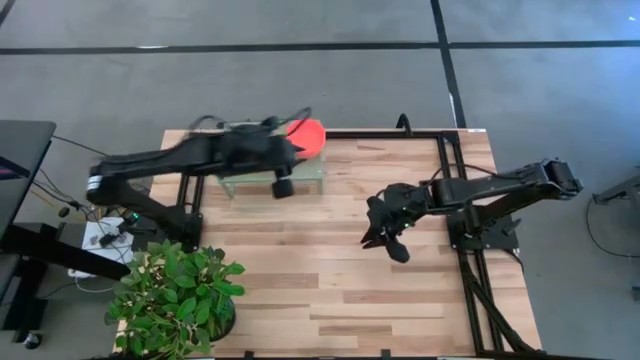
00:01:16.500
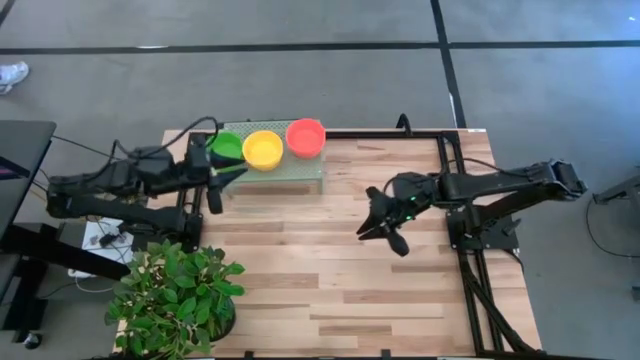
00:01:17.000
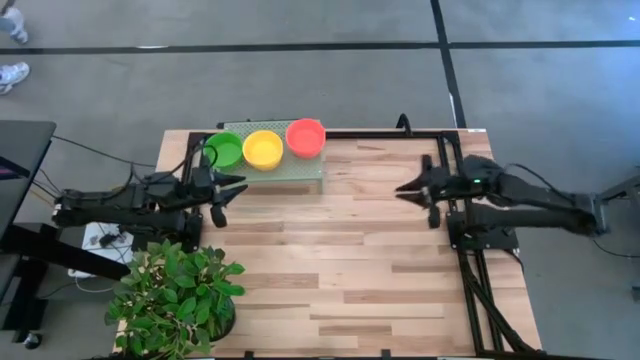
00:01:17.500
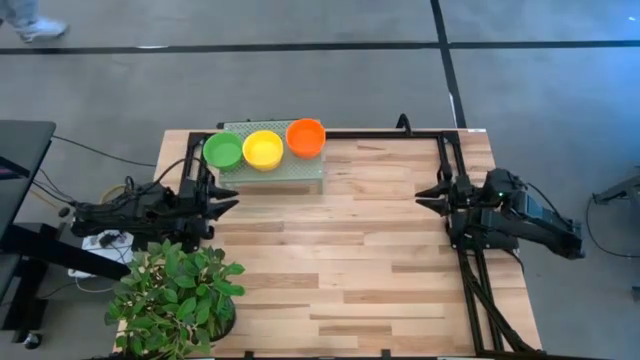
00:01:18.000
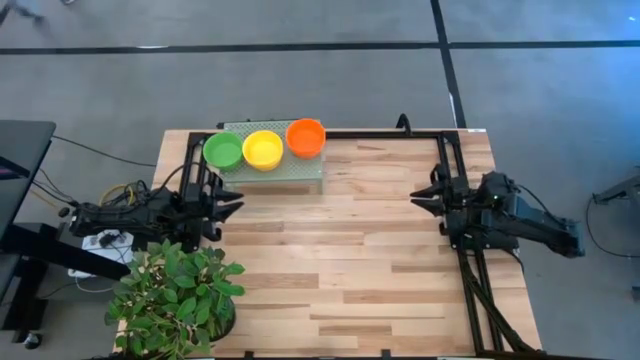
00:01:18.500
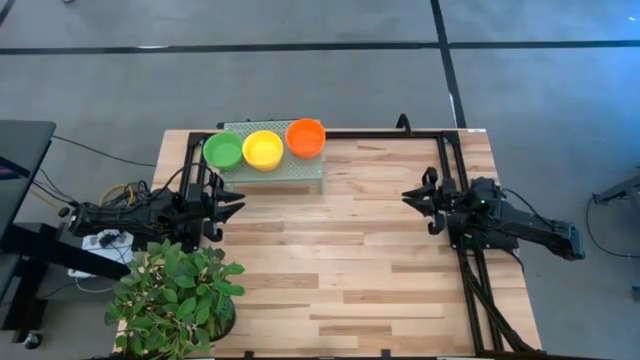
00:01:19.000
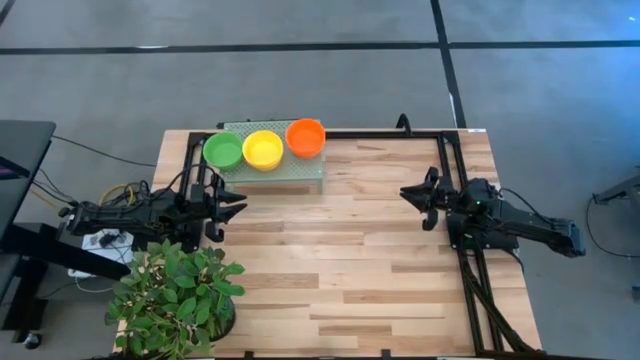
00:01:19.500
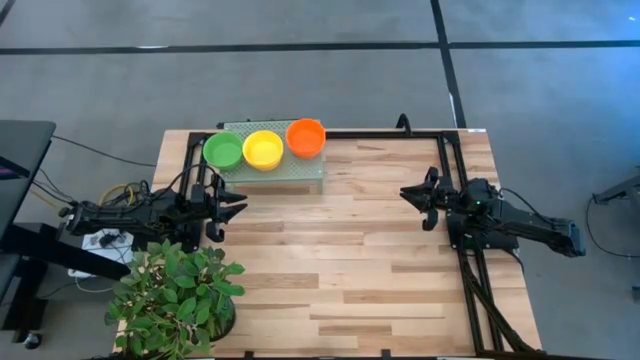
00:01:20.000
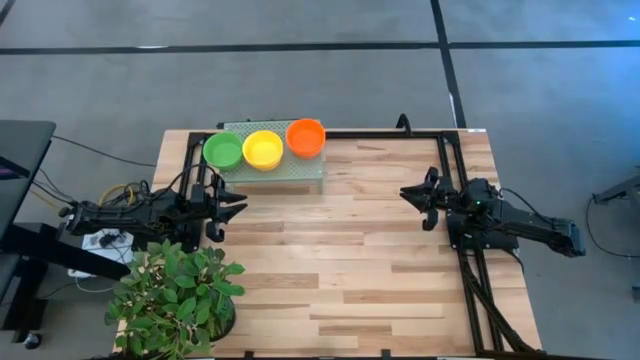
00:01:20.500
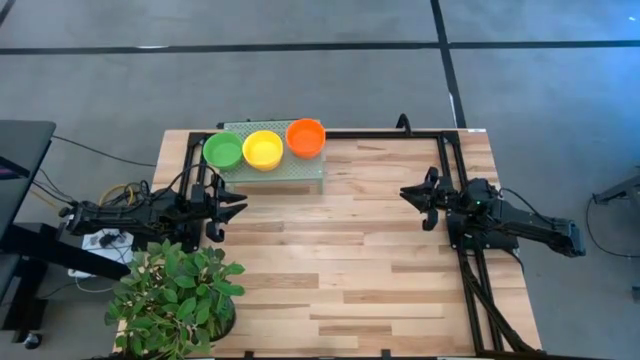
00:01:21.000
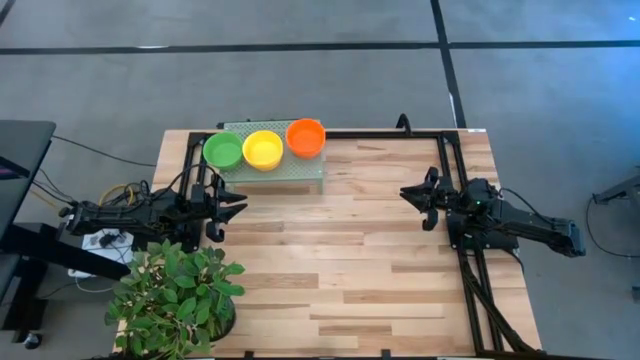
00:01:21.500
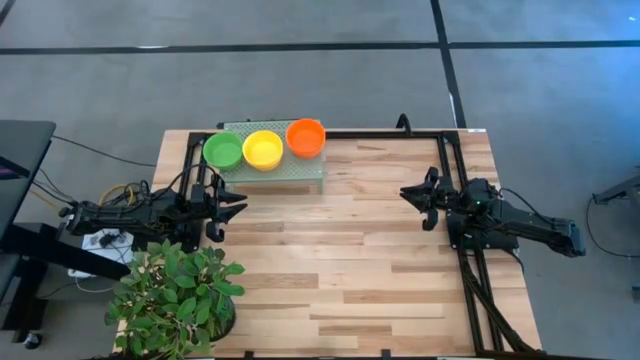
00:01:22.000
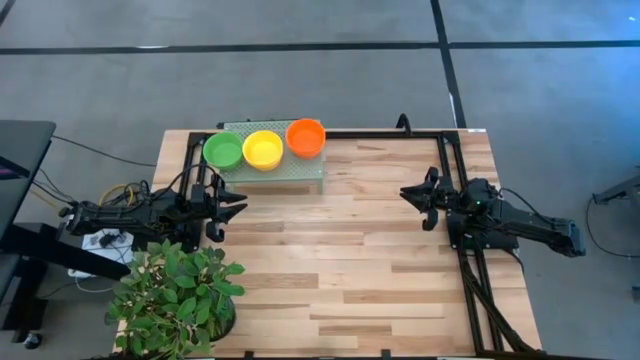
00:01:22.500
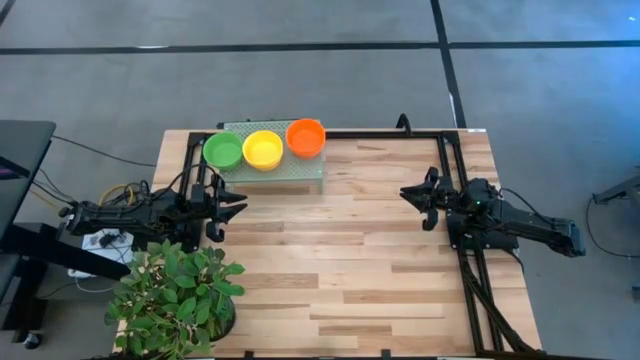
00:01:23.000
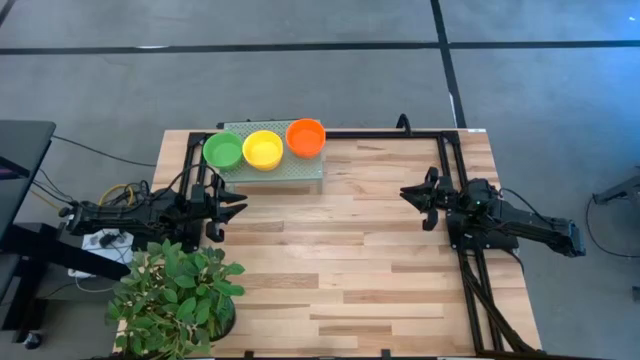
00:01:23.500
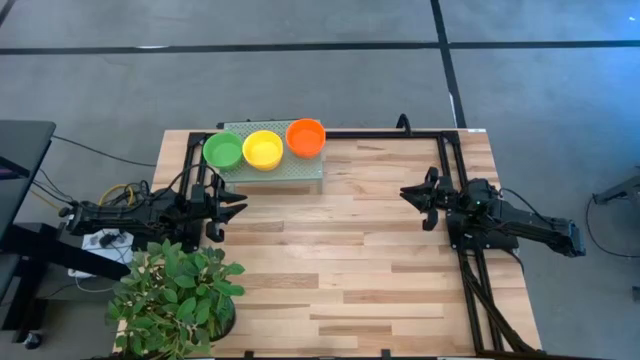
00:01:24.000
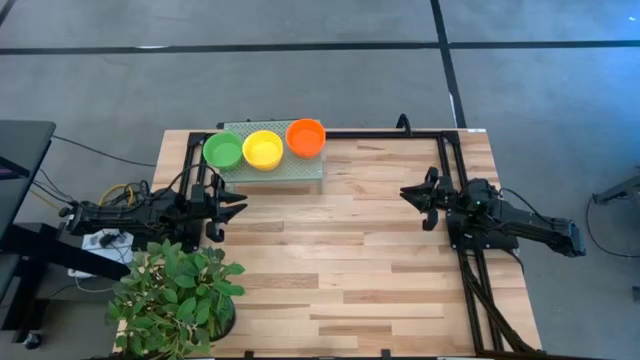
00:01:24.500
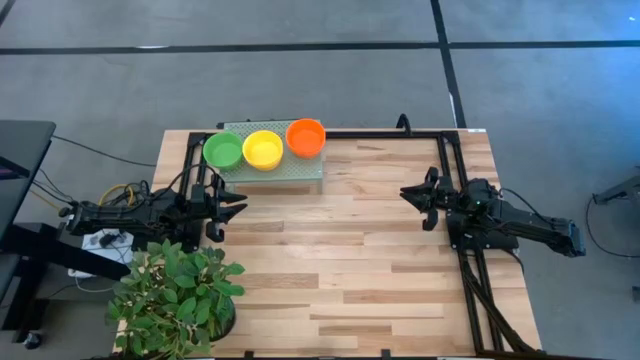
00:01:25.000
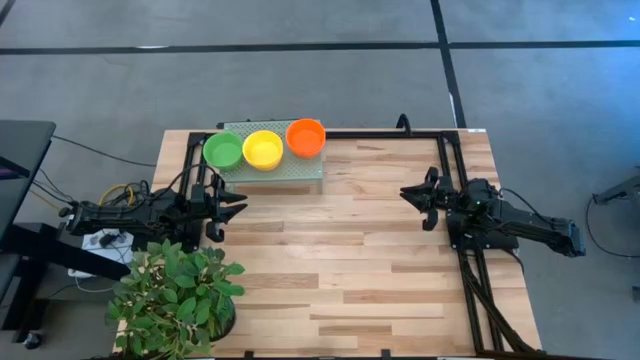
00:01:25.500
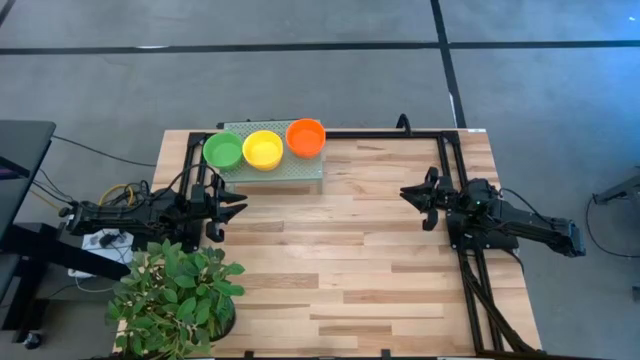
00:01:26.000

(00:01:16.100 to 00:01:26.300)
Task: Pick & Place Mini bowls
Return to Home Position

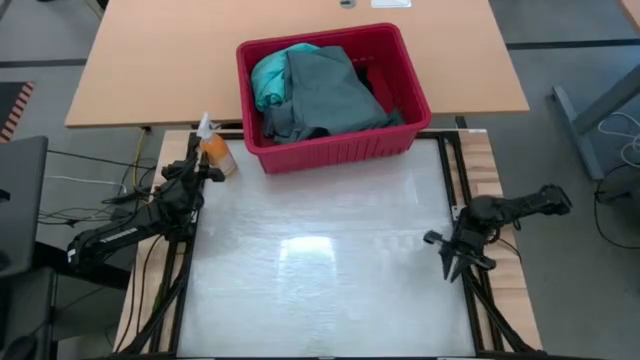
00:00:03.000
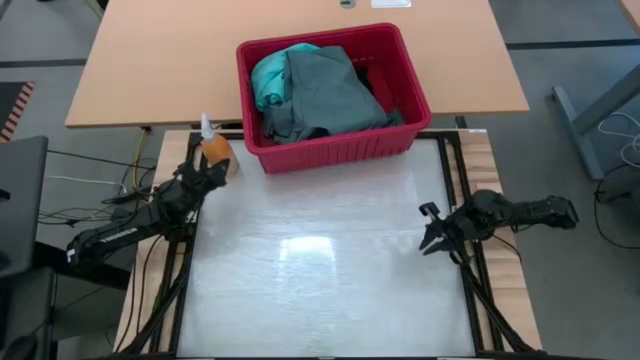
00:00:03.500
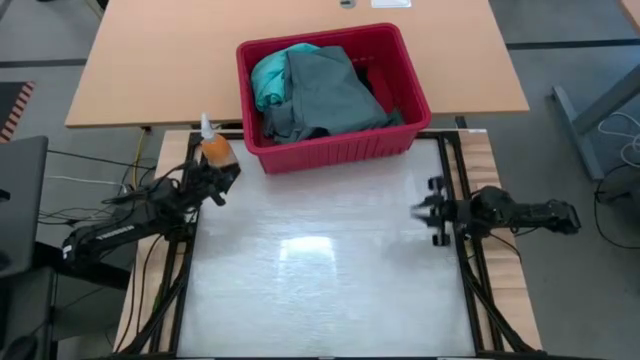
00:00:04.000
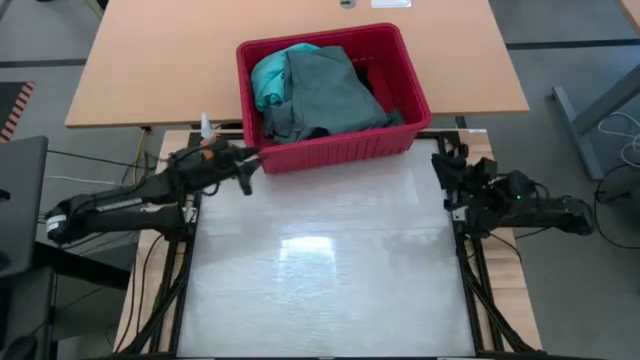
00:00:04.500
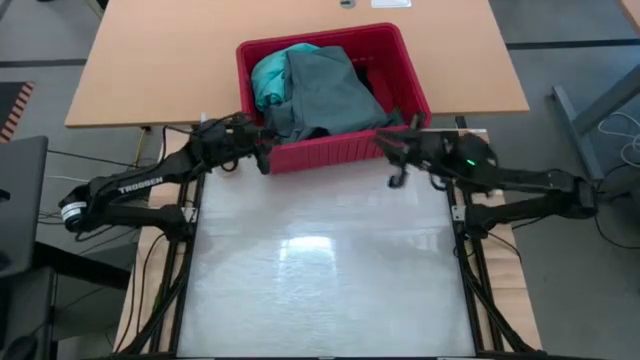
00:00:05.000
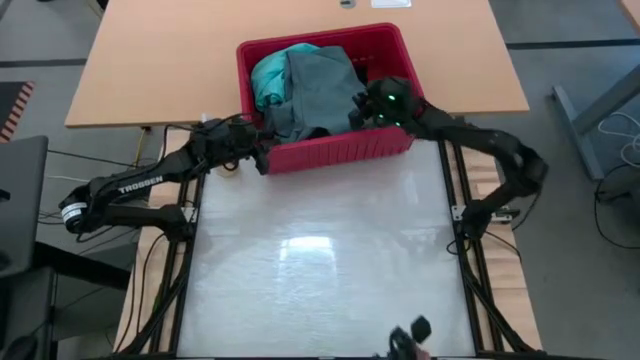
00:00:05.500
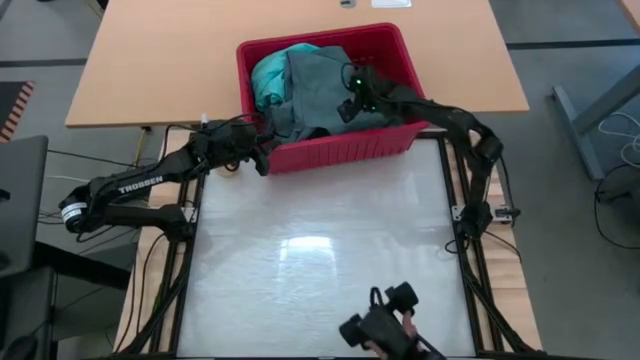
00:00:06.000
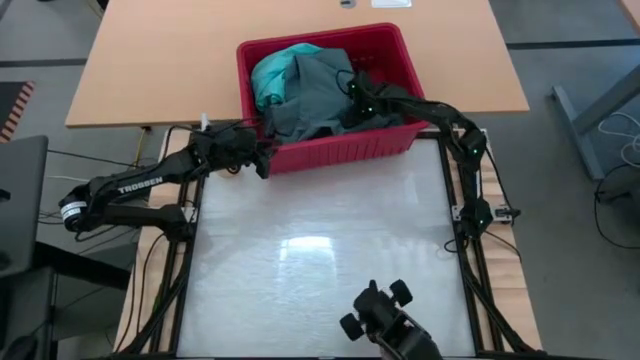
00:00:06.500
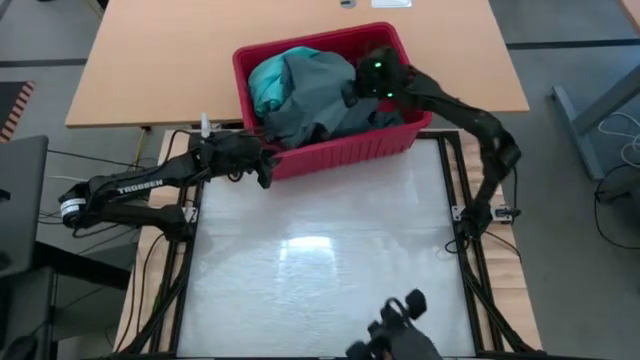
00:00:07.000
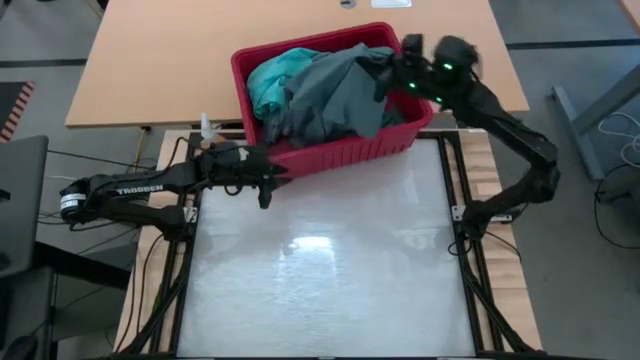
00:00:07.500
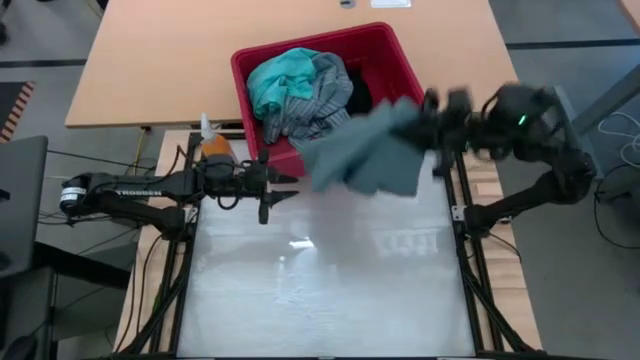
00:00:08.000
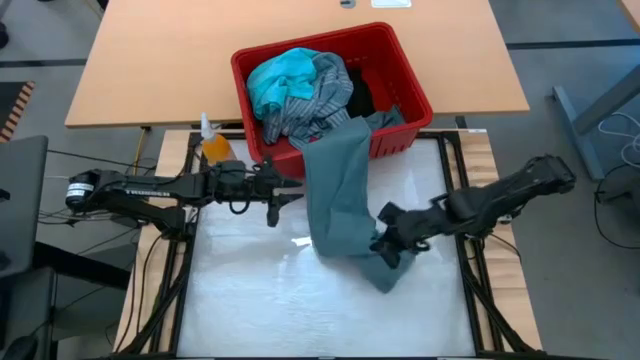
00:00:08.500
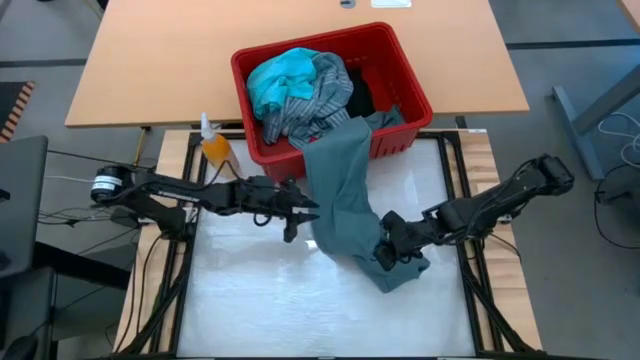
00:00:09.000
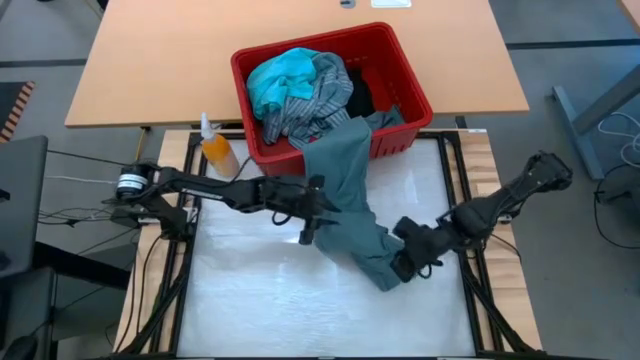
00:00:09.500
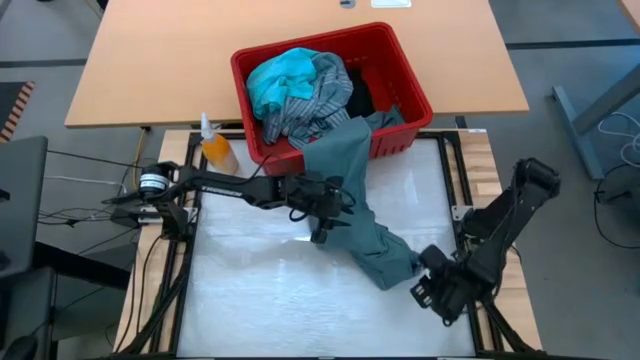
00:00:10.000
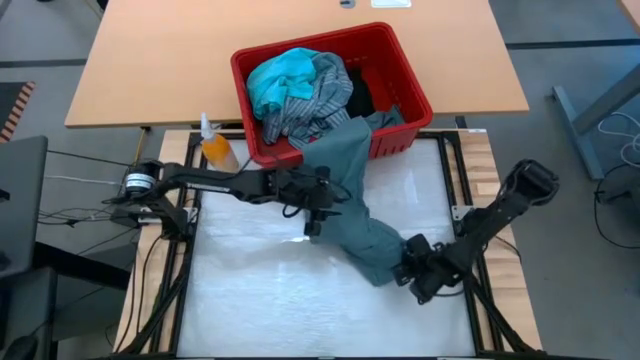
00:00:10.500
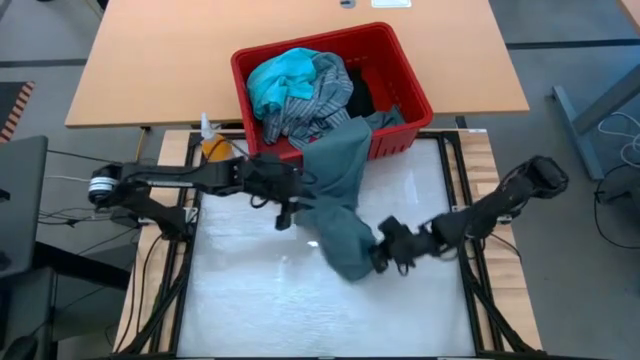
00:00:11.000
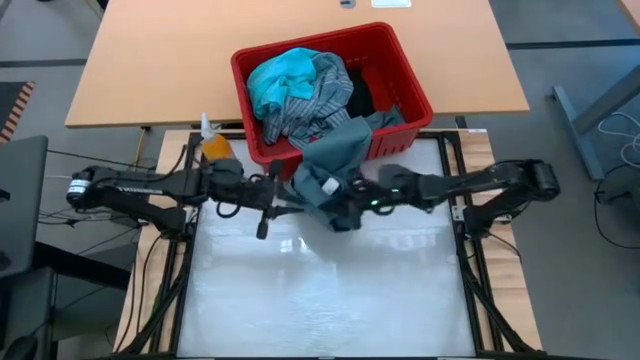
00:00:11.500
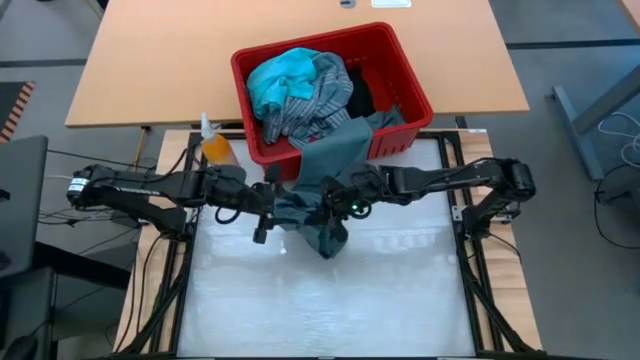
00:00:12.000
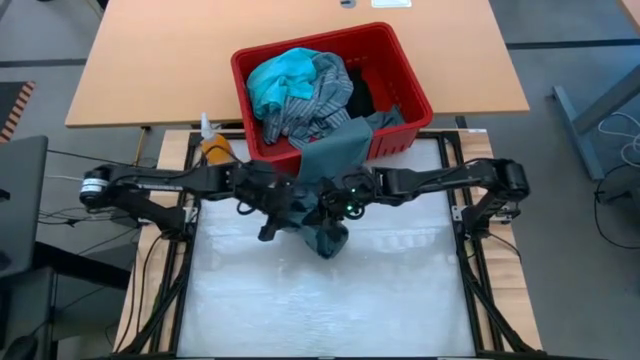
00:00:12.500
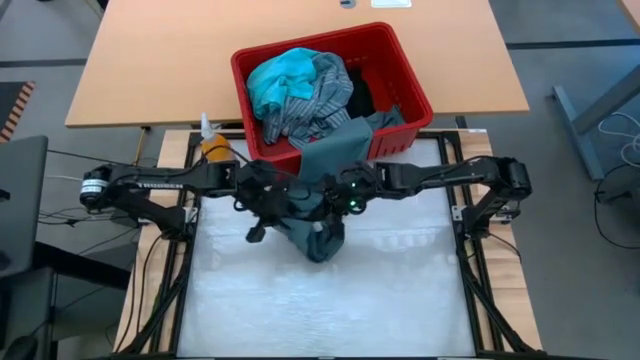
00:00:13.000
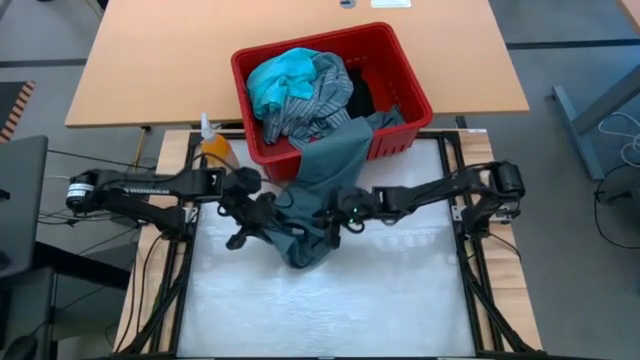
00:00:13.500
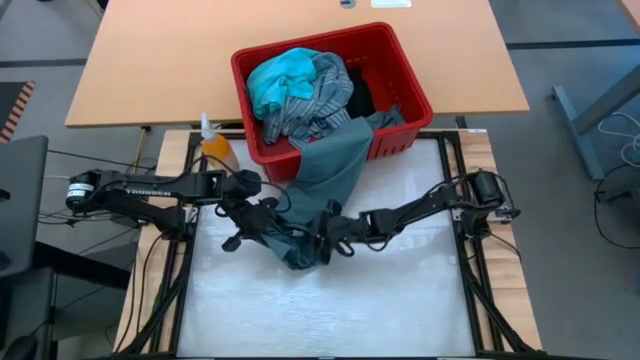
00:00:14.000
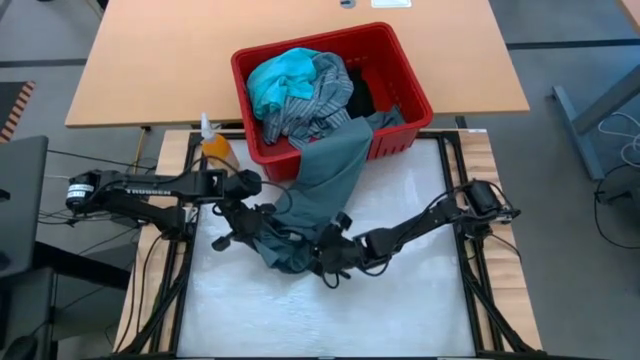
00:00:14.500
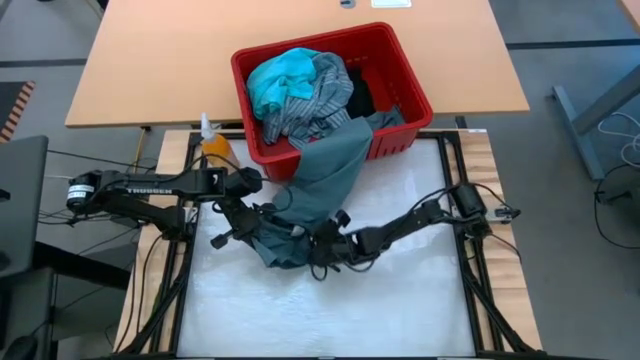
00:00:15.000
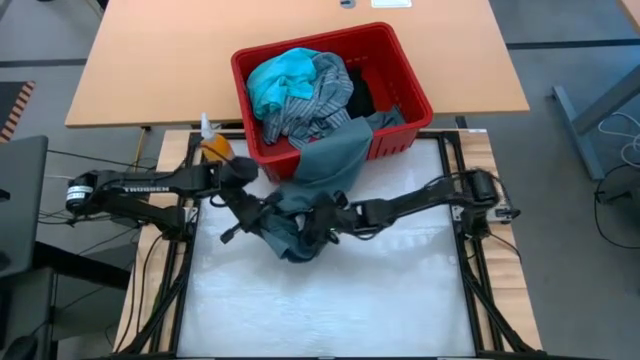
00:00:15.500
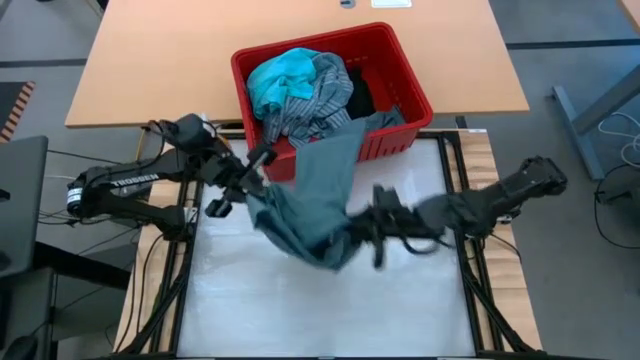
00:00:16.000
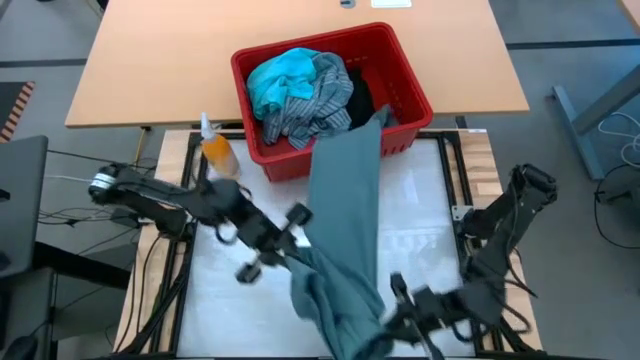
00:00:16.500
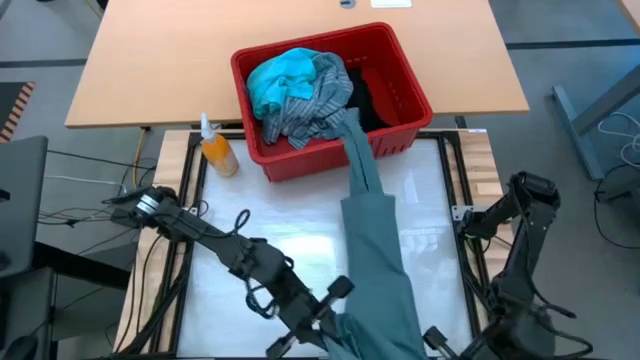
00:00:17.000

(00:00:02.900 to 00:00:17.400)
Task: Fold Laundry from Bin
Remove the dark blue pants from the red bin
